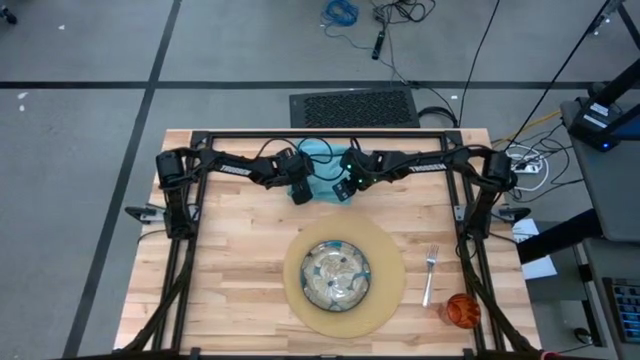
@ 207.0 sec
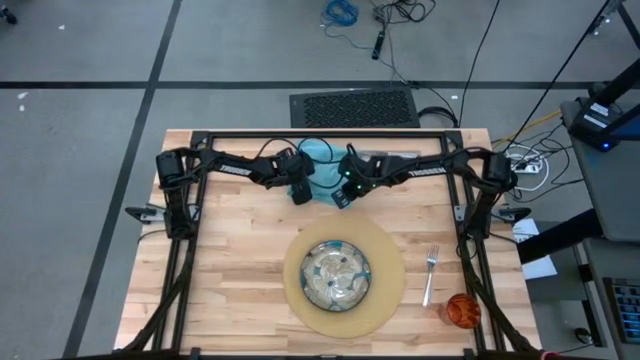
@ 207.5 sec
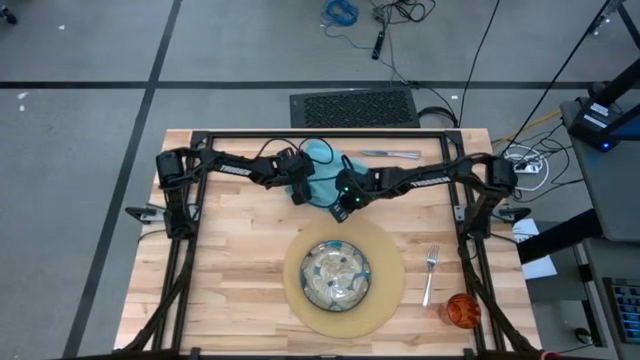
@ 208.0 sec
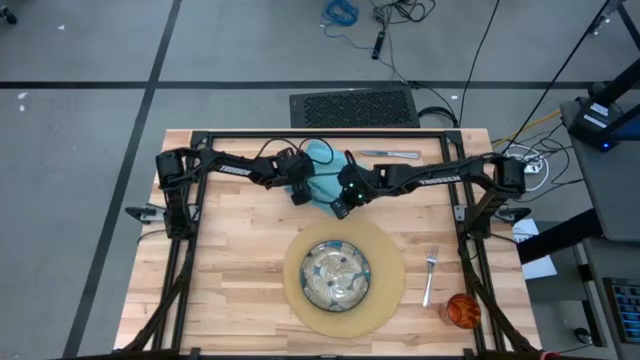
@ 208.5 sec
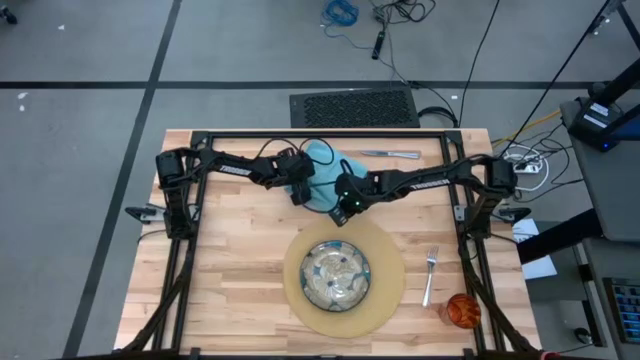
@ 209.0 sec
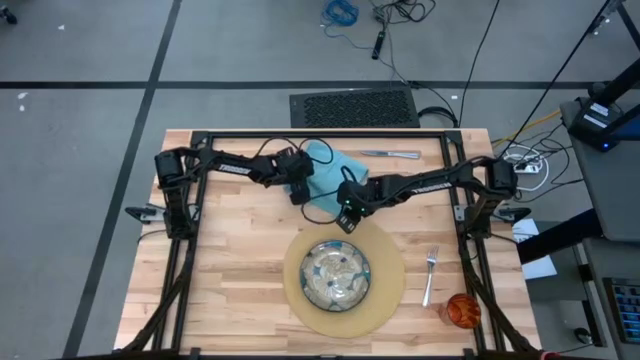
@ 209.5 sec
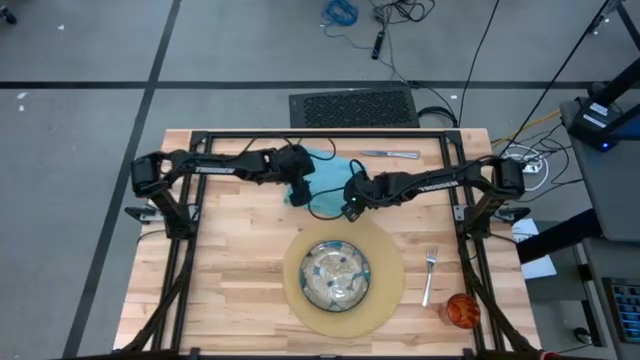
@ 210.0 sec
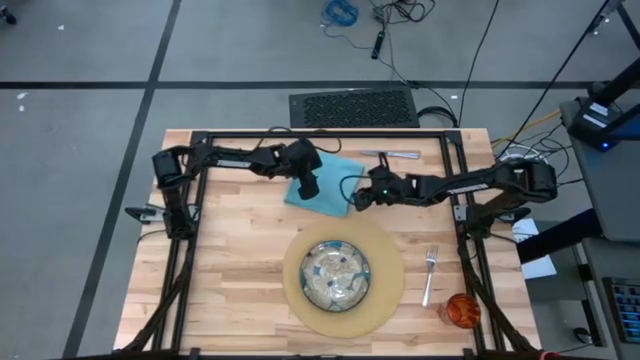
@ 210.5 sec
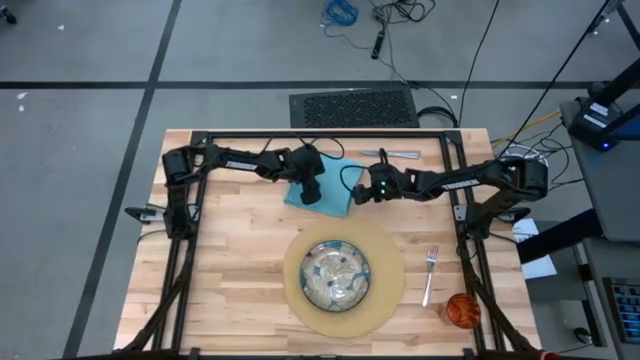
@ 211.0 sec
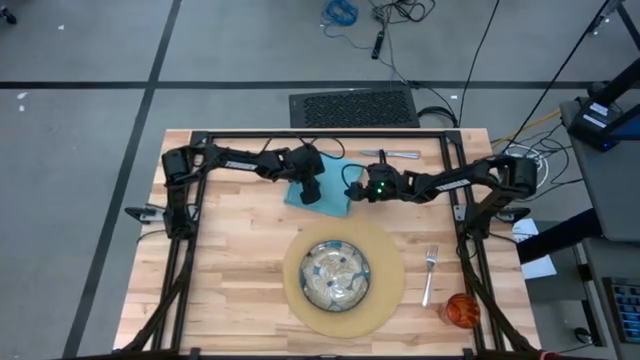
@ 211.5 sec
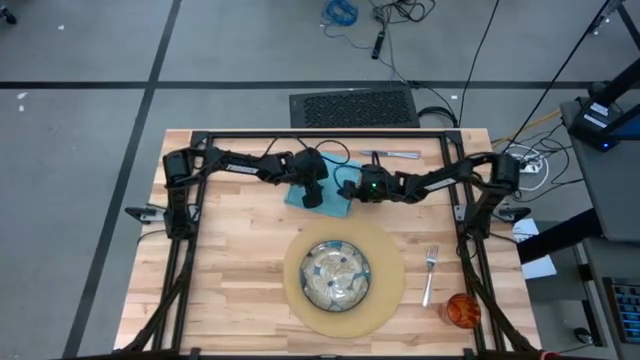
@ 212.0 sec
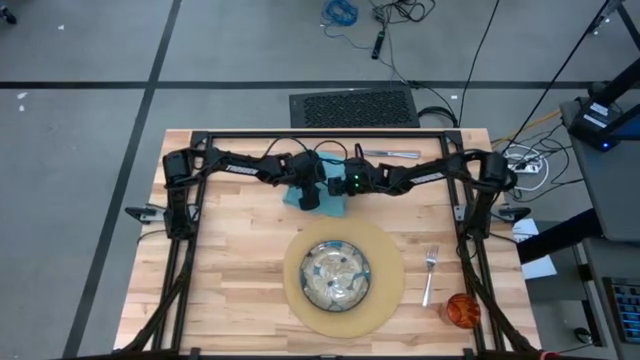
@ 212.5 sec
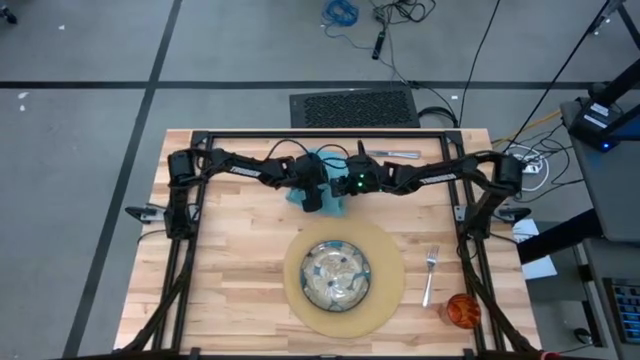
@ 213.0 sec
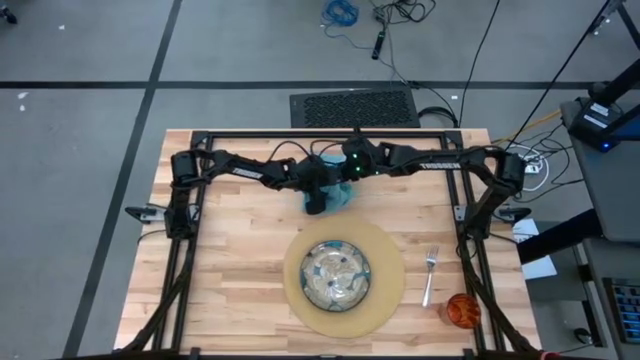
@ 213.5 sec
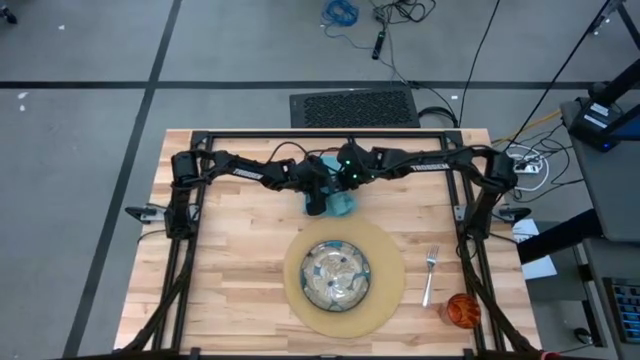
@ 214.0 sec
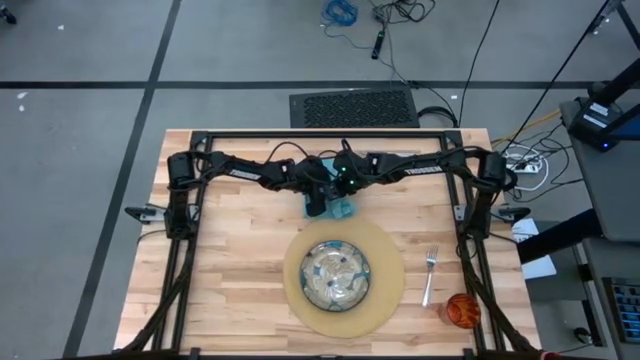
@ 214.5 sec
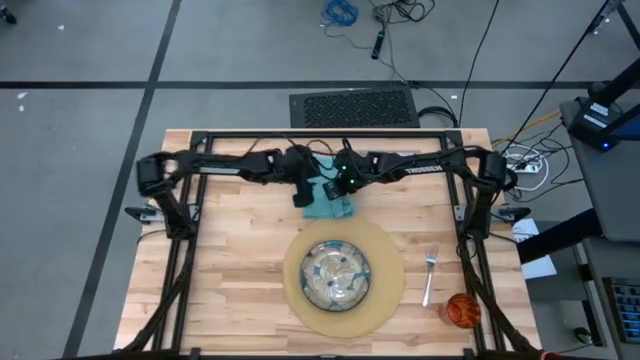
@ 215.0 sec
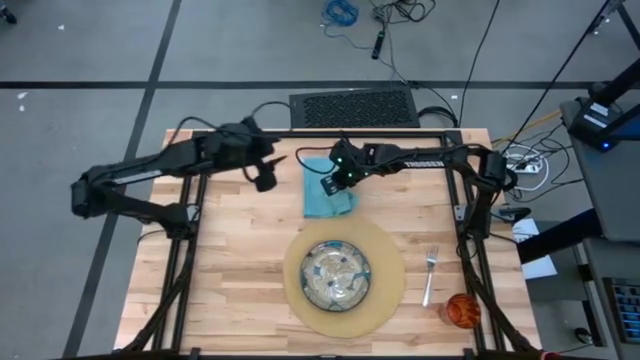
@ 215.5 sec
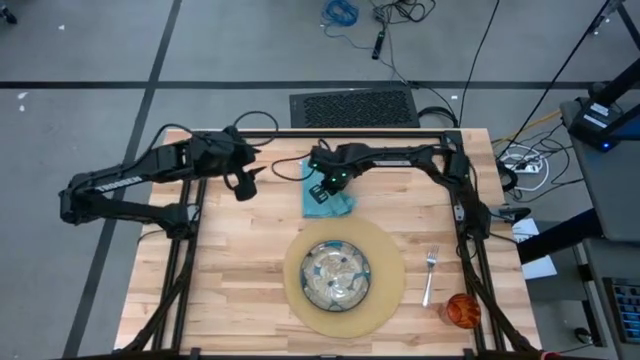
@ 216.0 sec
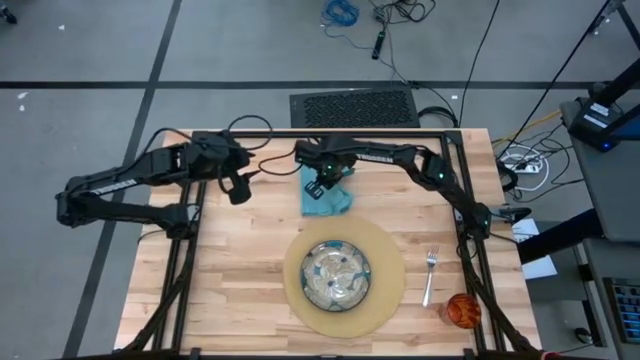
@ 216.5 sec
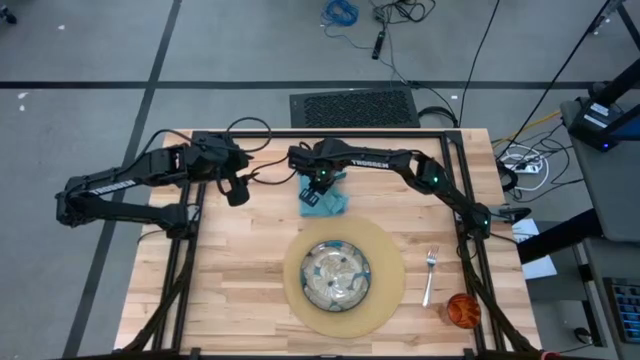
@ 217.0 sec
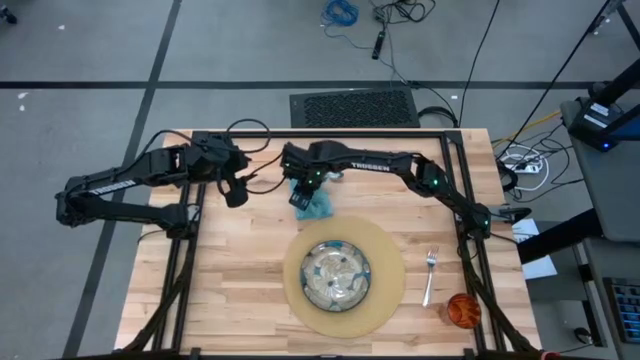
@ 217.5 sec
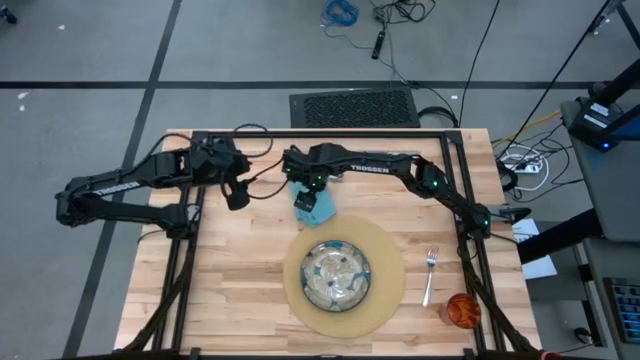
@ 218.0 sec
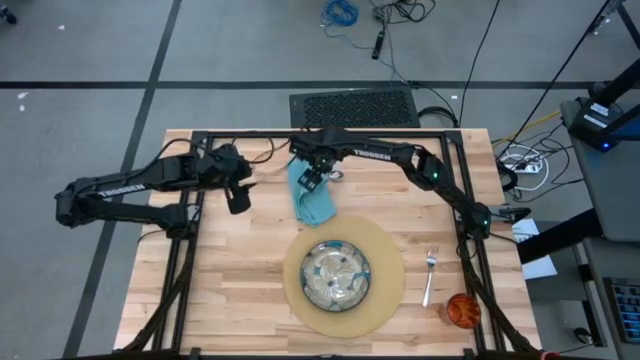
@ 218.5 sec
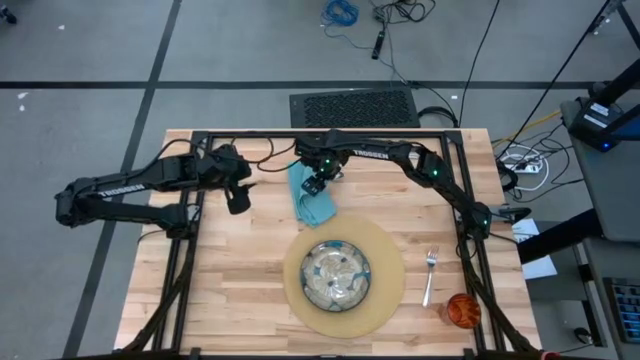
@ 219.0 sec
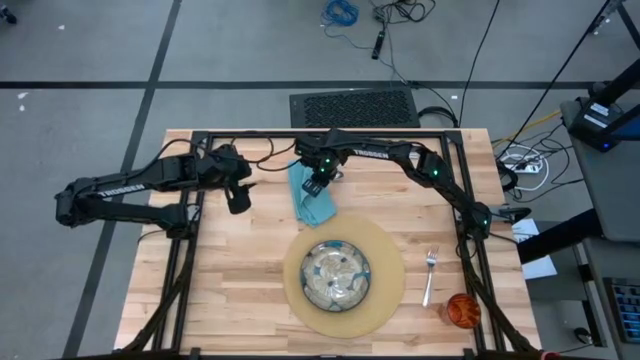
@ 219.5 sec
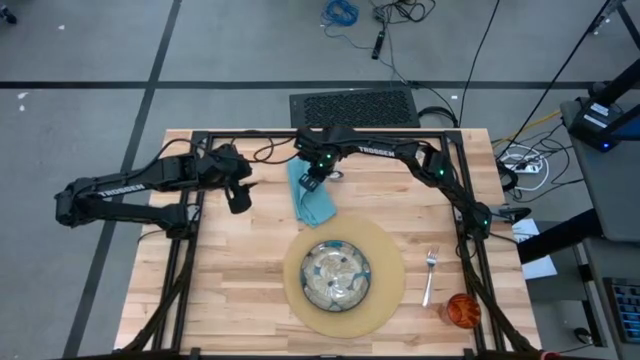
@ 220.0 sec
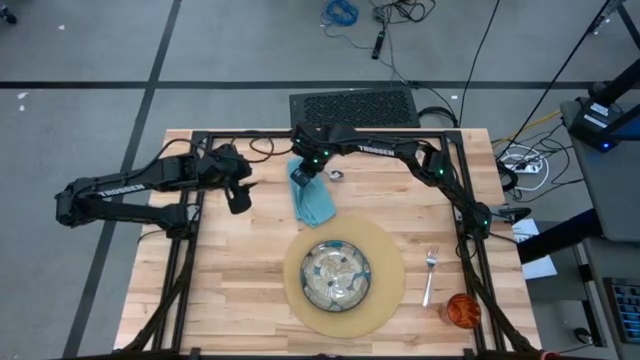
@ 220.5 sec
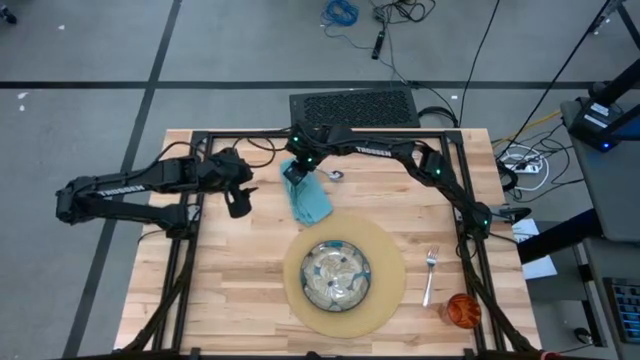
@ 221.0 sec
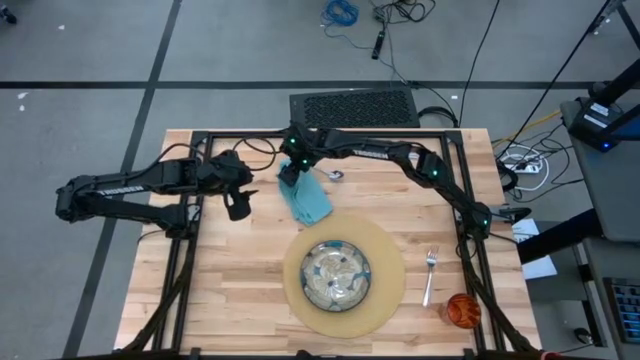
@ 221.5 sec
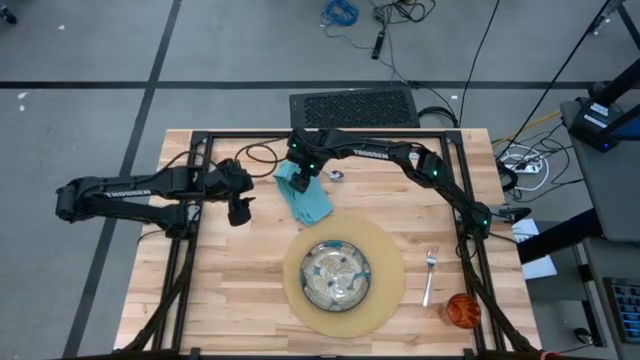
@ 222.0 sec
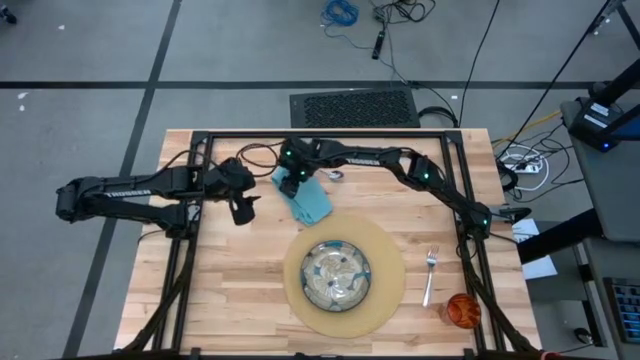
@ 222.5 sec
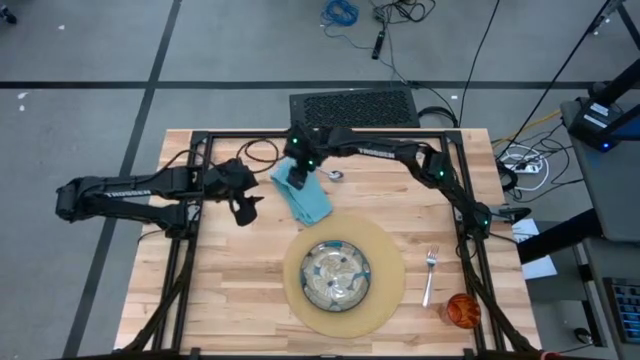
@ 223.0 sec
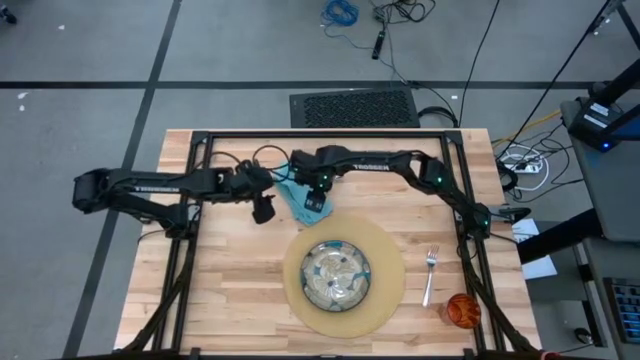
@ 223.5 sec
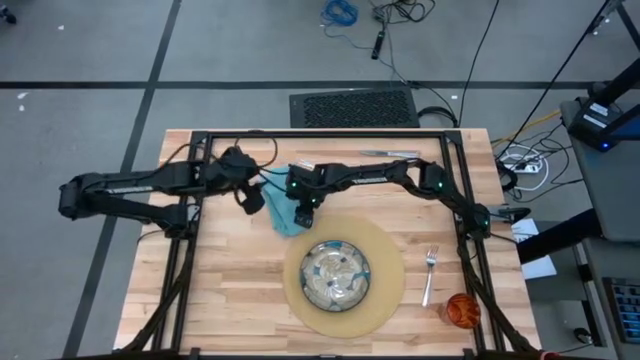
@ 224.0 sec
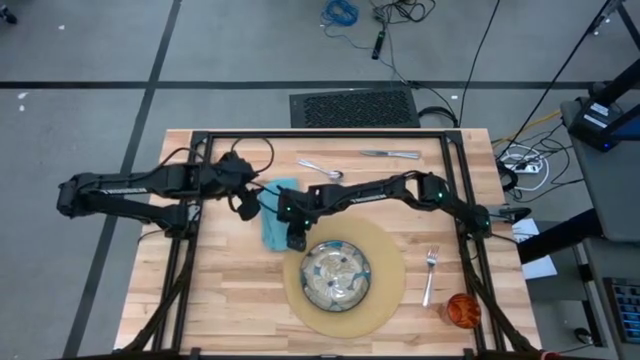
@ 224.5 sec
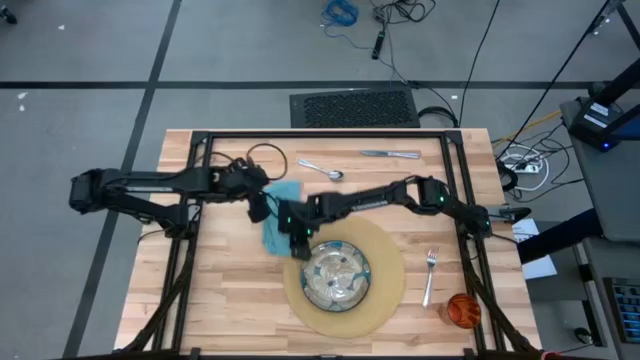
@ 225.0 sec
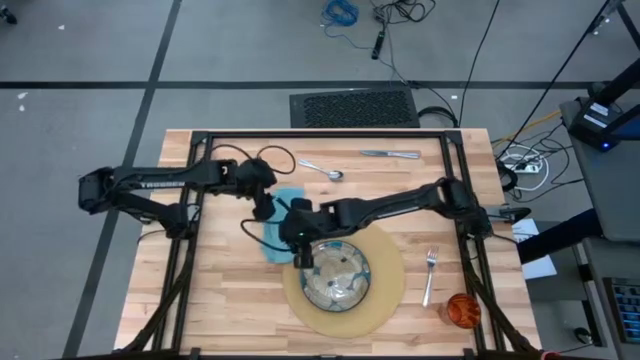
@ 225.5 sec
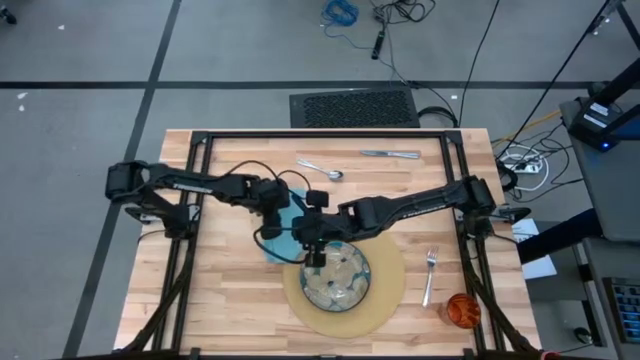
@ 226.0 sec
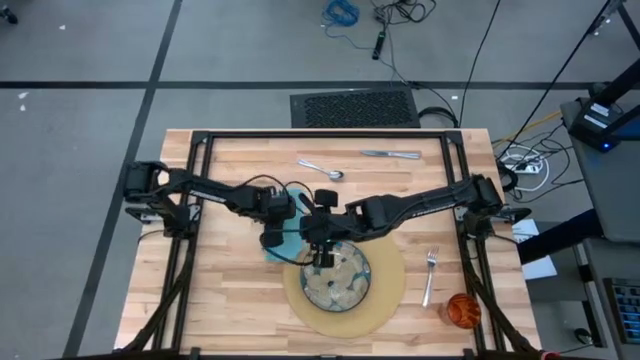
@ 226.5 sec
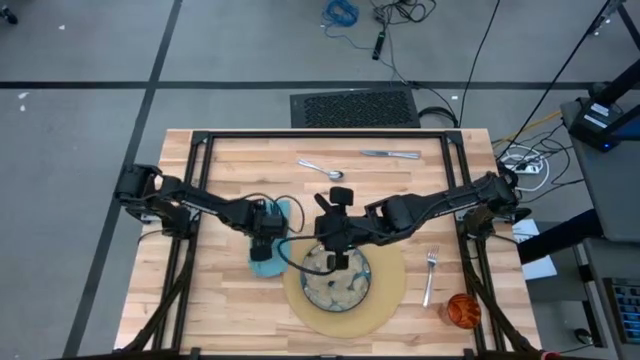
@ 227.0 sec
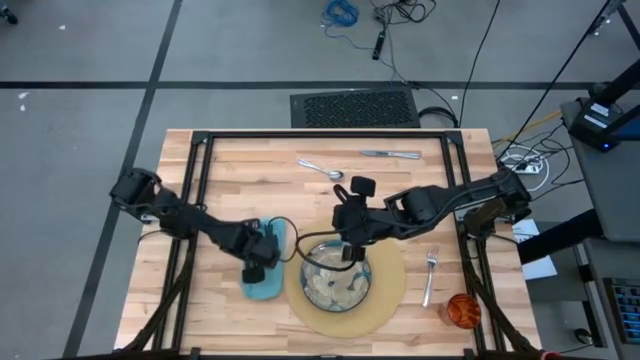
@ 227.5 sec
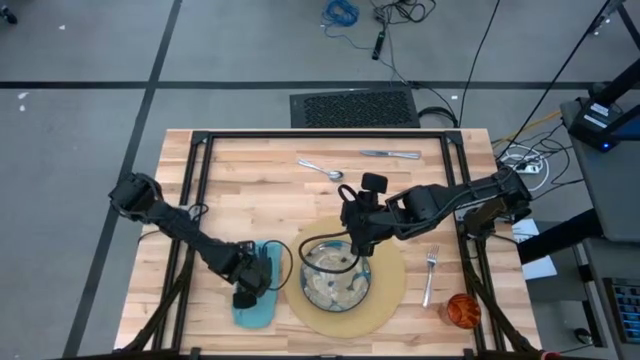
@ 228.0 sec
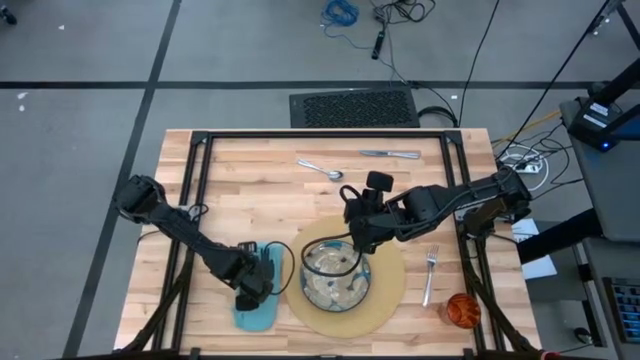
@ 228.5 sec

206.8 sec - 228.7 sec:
Task: Set table place
Fold the blue napkin
